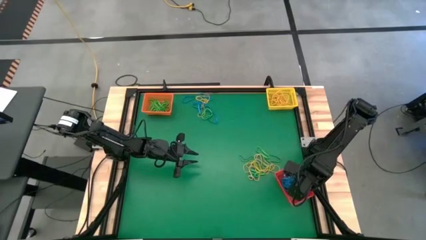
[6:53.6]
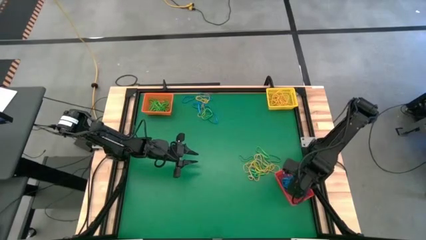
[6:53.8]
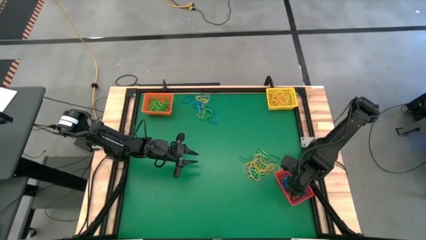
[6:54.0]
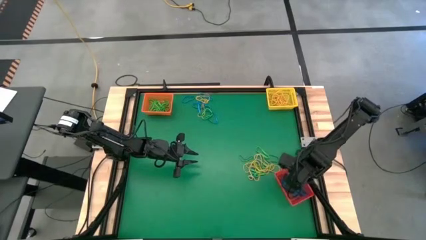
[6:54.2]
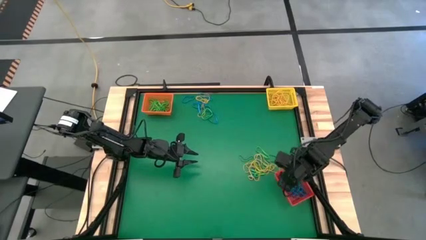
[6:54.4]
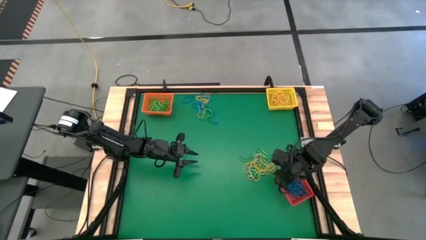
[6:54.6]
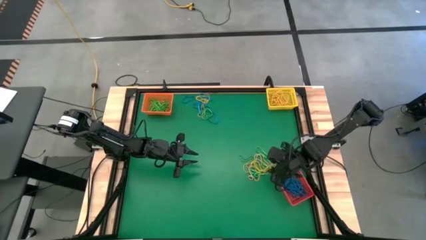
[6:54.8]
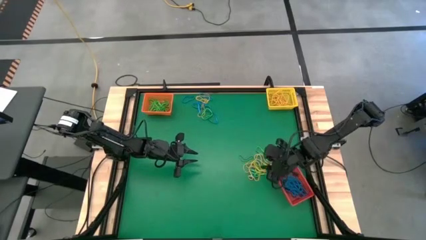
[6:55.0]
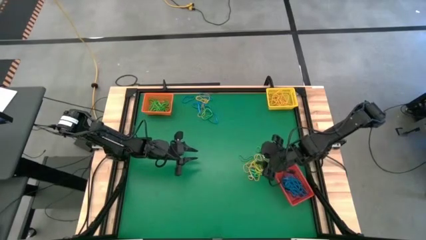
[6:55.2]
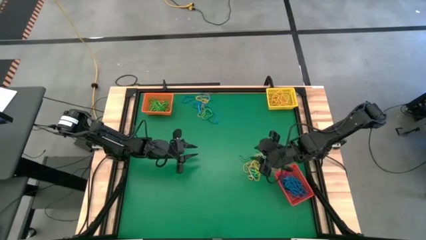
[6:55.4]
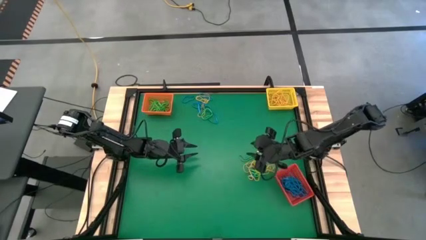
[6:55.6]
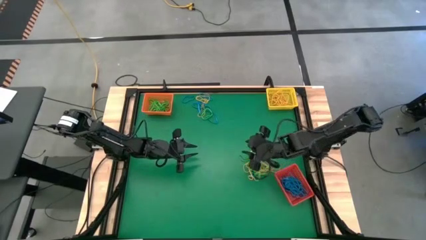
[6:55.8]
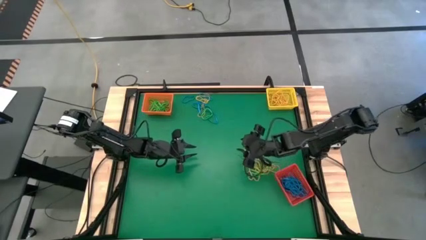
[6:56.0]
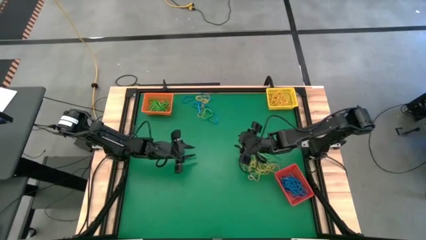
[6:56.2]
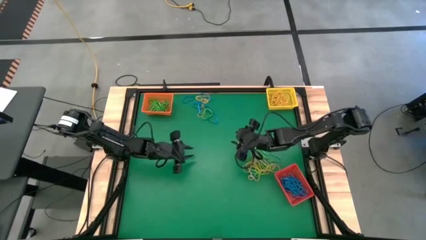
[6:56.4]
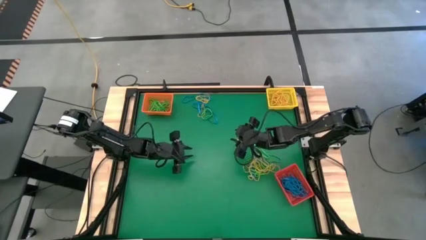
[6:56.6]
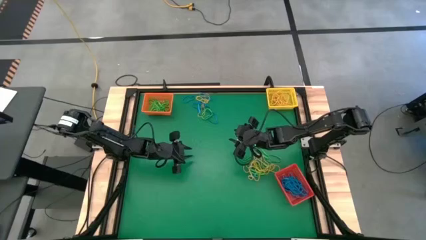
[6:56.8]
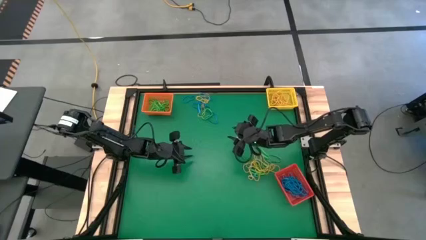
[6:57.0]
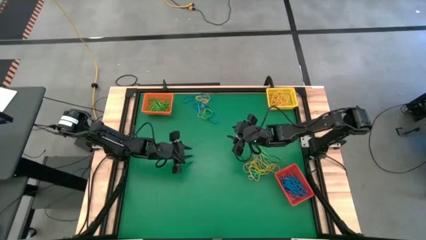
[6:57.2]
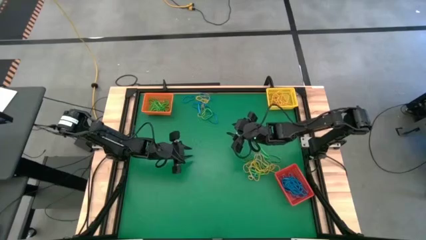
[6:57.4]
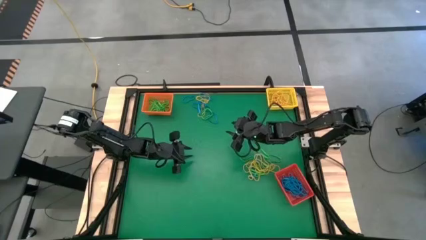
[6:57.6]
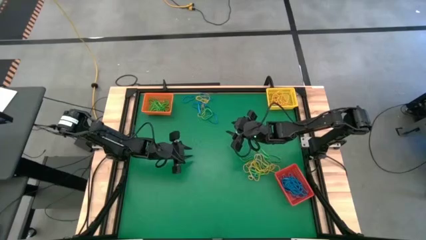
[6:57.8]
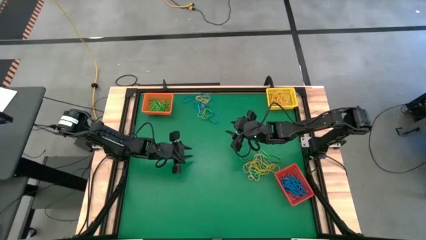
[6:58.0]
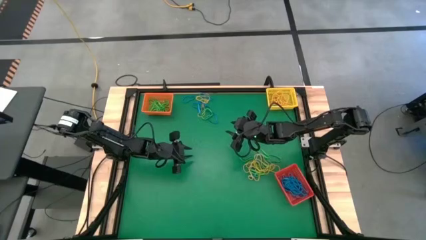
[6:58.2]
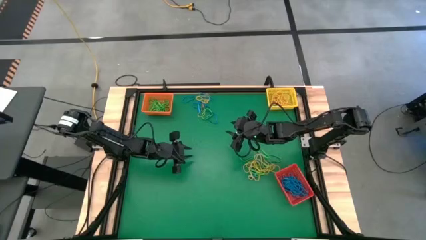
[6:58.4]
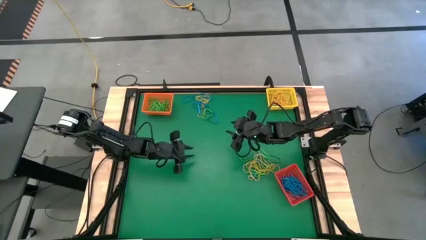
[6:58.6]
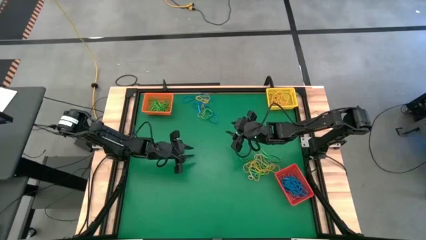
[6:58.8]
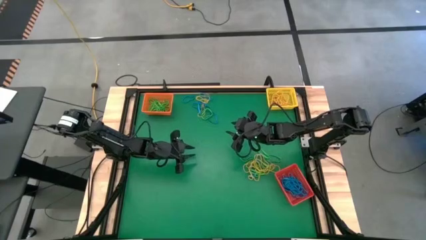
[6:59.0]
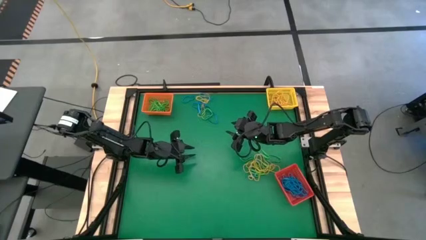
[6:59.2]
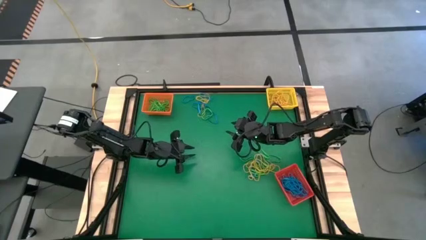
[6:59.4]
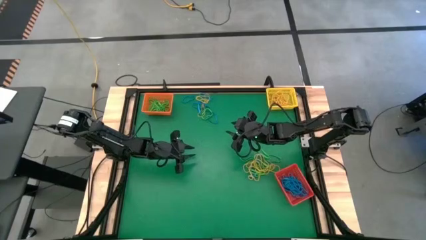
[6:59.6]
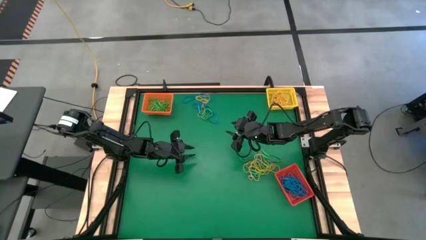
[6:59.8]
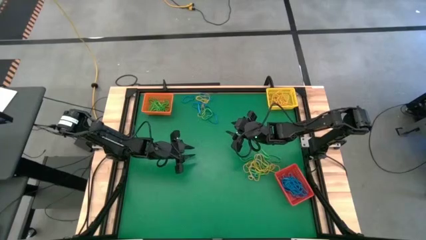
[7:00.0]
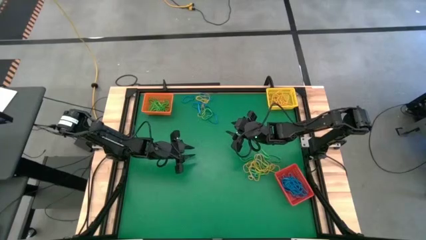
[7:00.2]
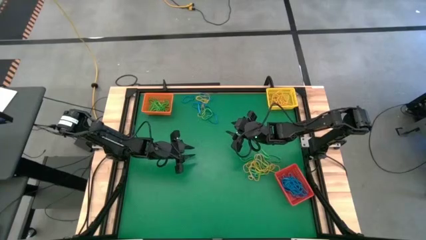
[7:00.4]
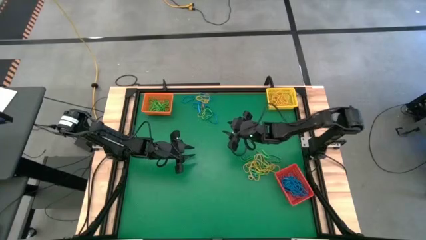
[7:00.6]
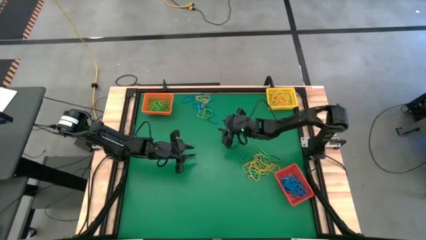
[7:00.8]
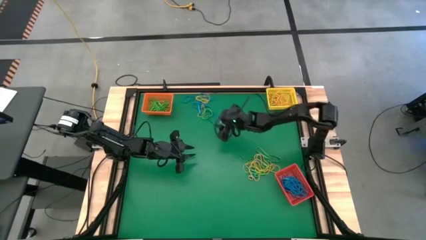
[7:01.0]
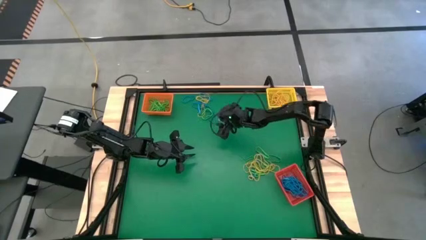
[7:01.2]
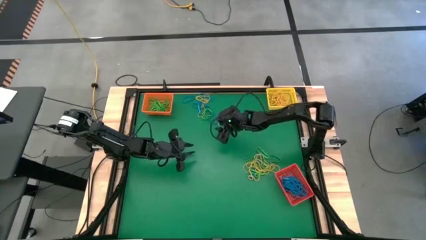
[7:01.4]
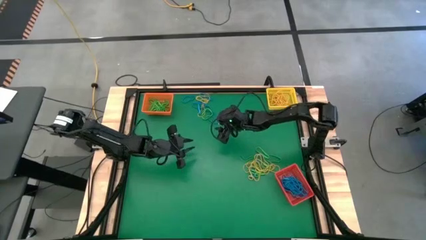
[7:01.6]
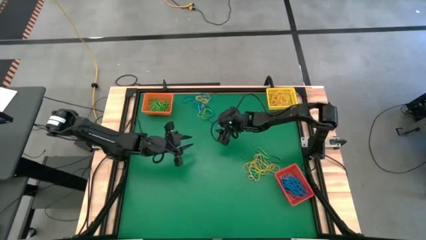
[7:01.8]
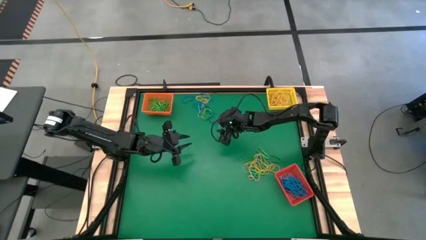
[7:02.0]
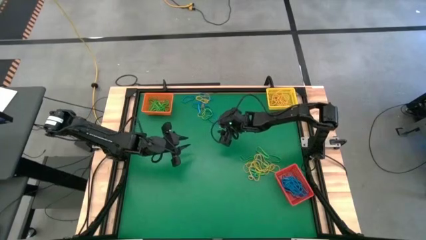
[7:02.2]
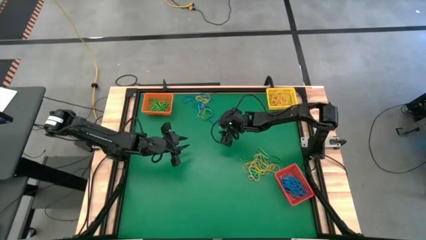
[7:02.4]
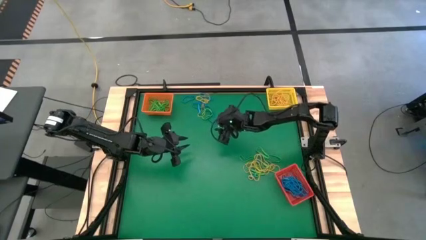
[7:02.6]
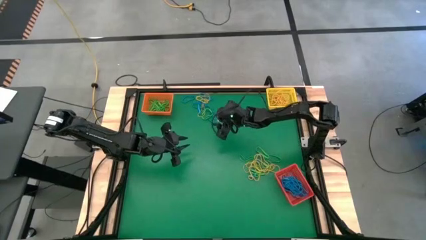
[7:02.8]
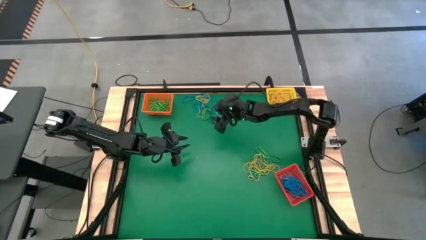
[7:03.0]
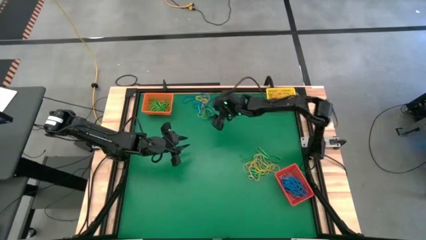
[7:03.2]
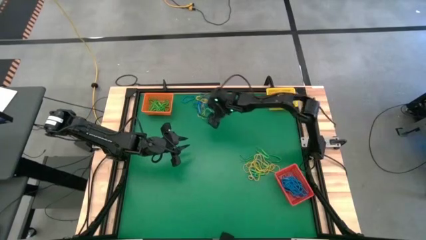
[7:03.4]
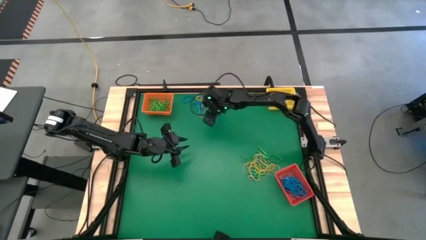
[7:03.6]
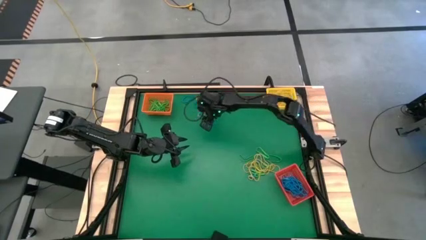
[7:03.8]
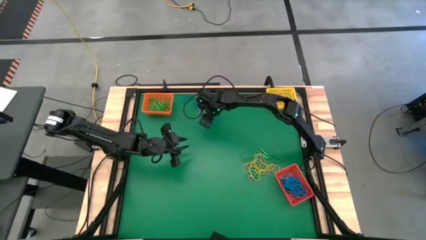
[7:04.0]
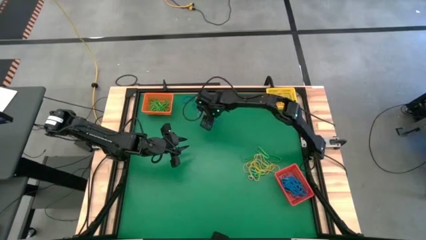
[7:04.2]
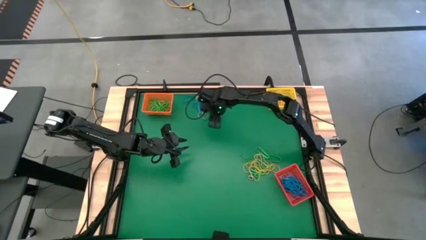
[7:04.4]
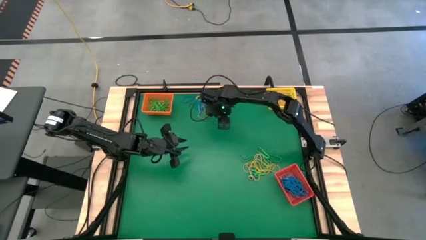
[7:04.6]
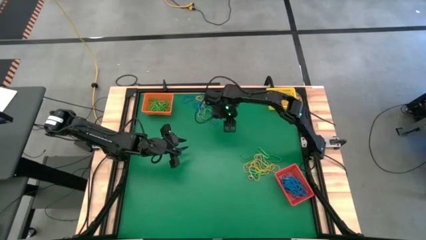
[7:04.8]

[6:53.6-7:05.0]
Task: Sort rubber bands into baskets
Put the green rubber band into the orange bin

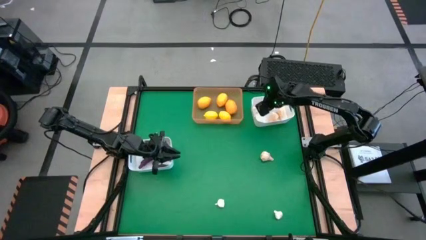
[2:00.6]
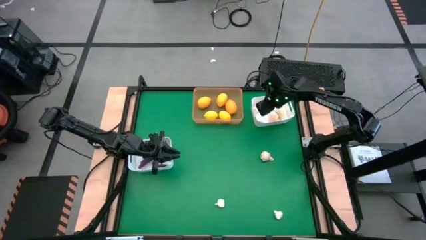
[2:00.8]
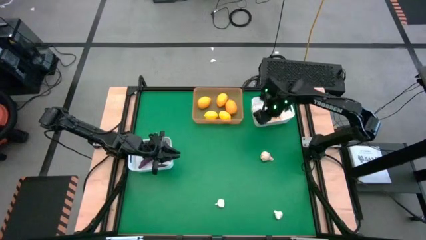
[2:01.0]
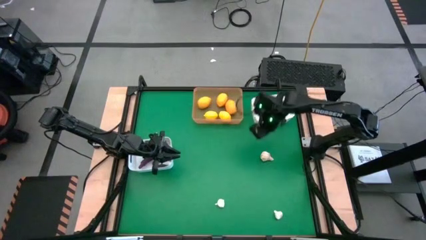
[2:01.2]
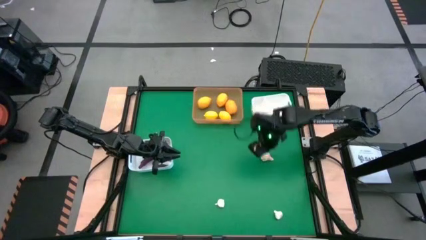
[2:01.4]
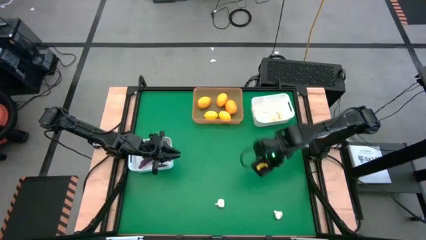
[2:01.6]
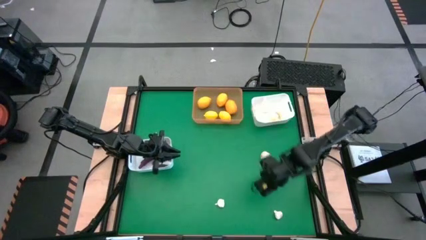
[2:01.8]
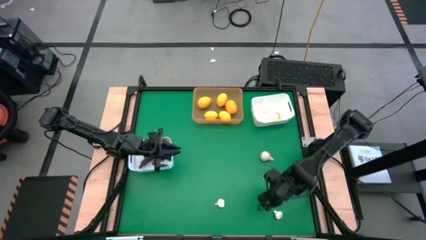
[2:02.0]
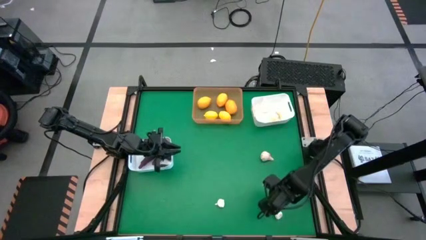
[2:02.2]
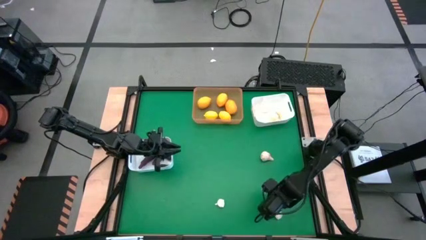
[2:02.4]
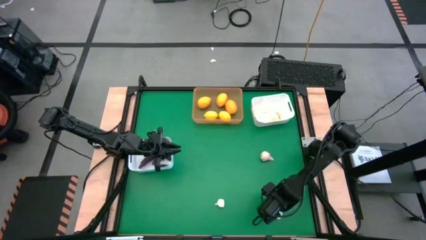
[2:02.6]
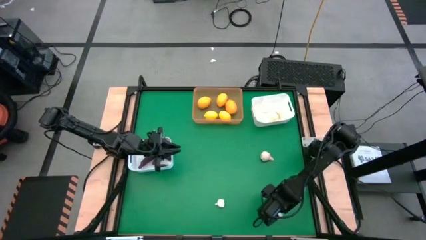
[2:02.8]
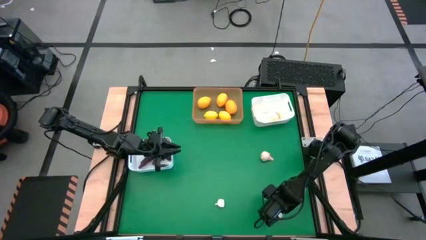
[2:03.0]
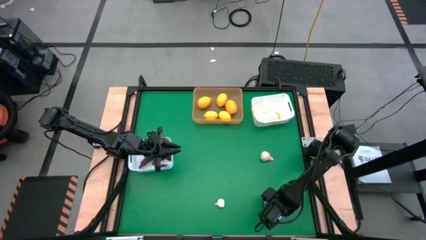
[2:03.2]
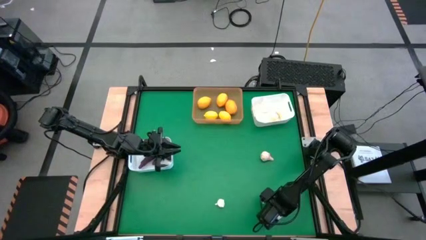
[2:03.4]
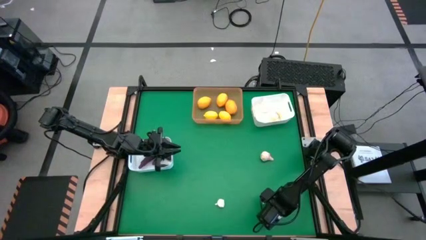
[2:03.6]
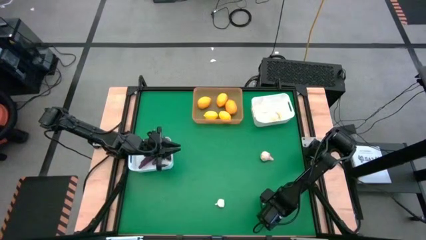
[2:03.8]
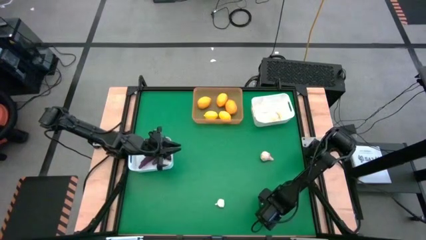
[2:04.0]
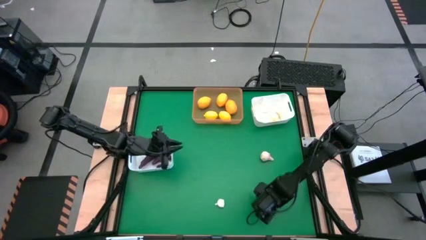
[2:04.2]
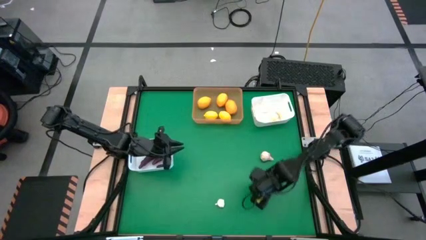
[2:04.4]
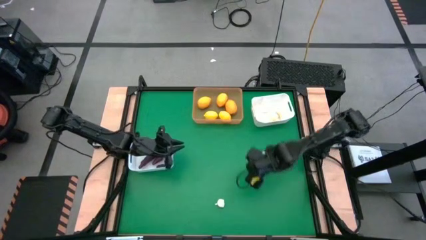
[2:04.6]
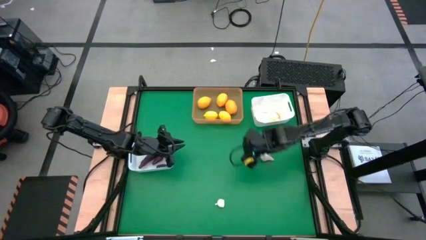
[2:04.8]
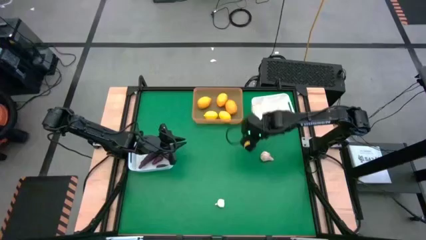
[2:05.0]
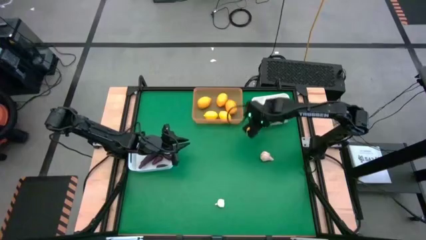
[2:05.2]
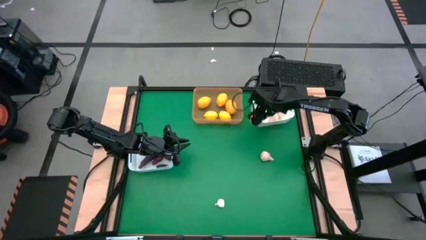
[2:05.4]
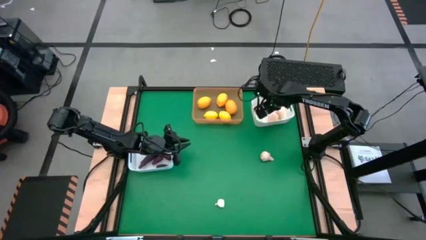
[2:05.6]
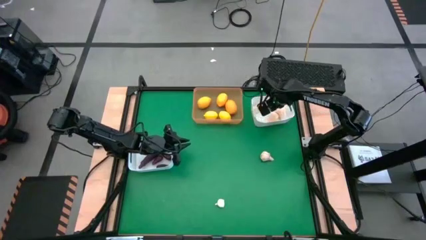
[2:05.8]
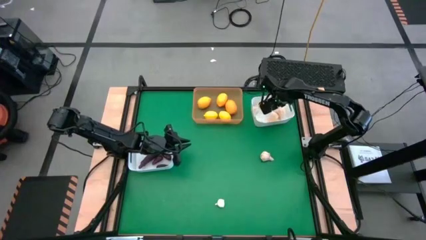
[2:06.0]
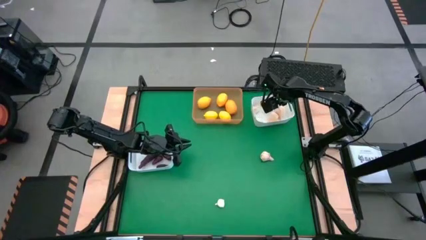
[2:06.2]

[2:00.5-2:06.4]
Task: Sort produce into baskets
Put the garlic into the right white bin
